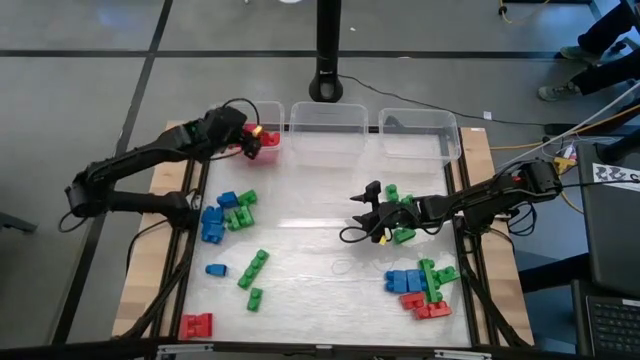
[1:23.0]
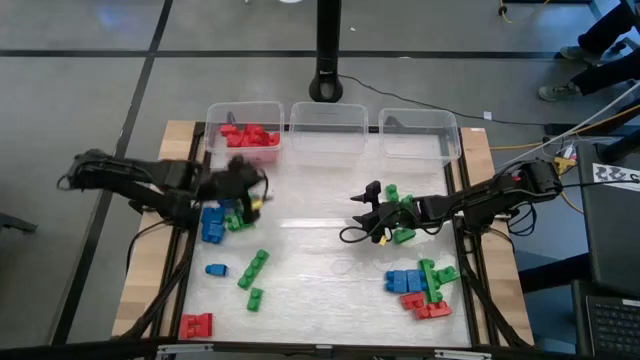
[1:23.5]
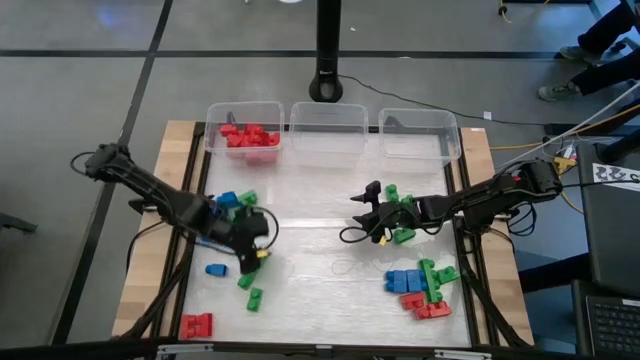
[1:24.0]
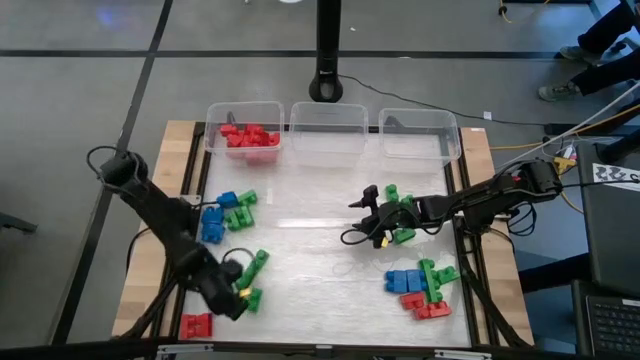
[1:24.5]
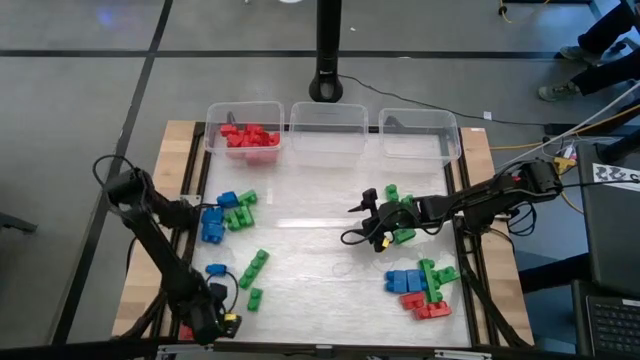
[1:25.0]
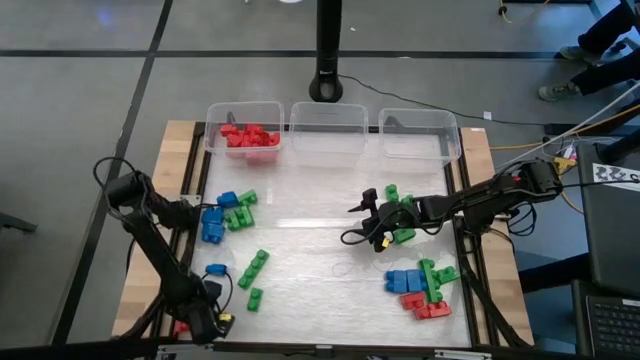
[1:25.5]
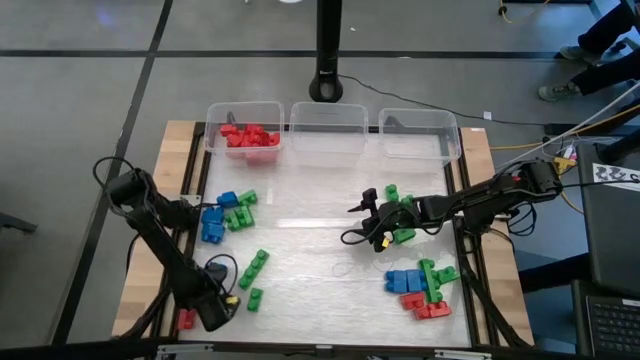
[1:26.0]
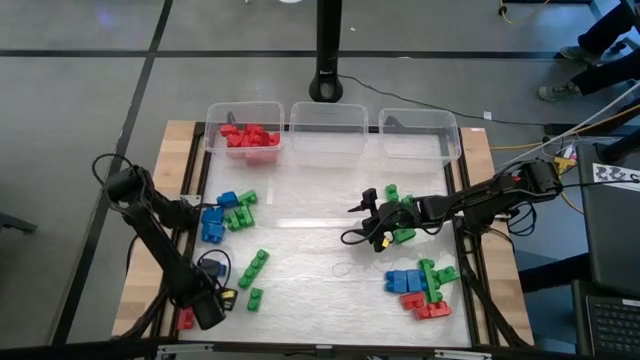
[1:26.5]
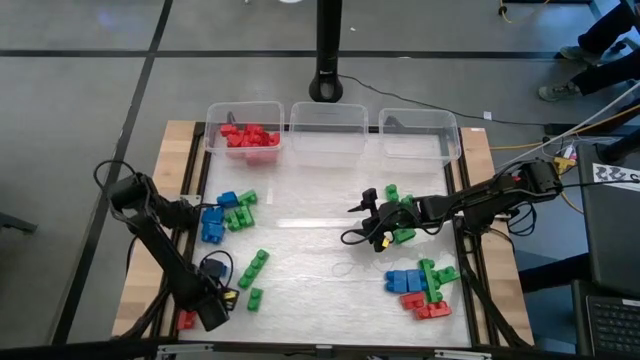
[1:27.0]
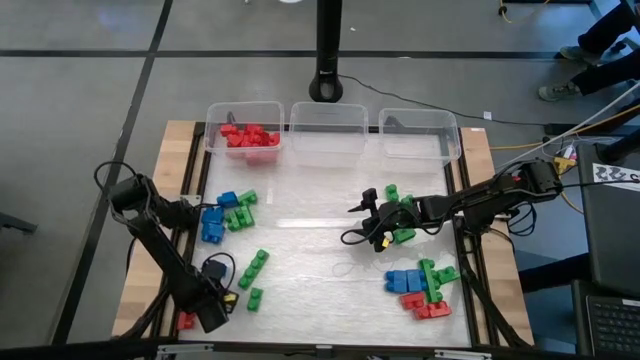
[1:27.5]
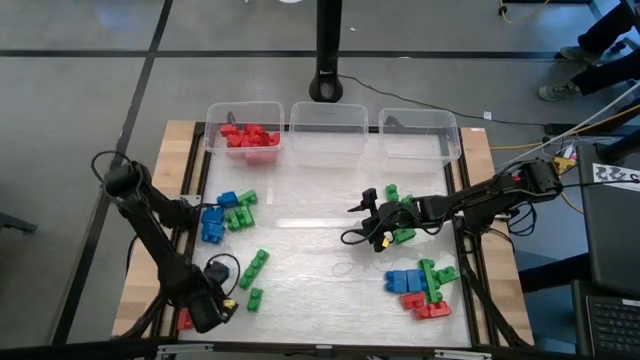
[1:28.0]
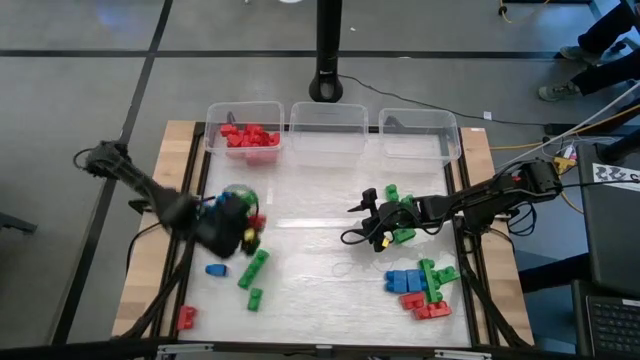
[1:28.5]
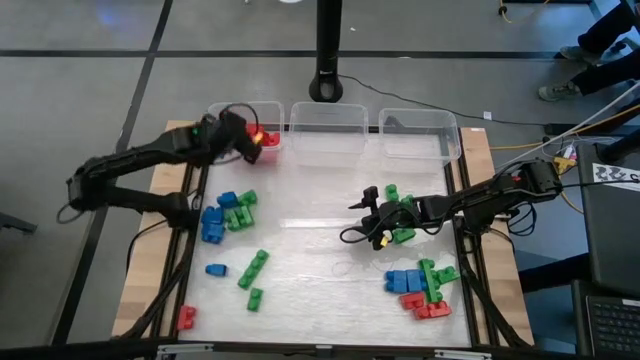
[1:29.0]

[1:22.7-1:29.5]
Task: Sort blocks
Put the red game piece into the left transparent bin

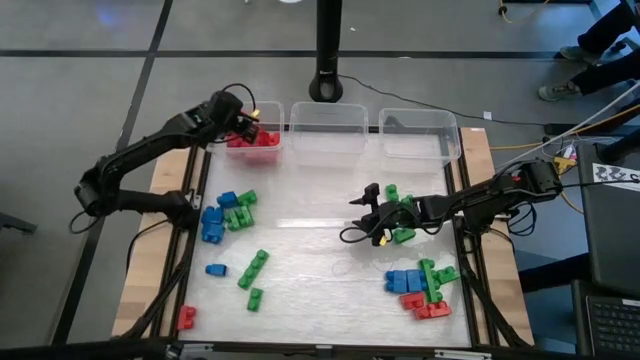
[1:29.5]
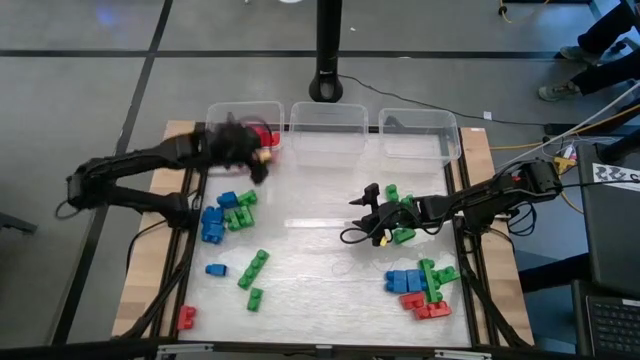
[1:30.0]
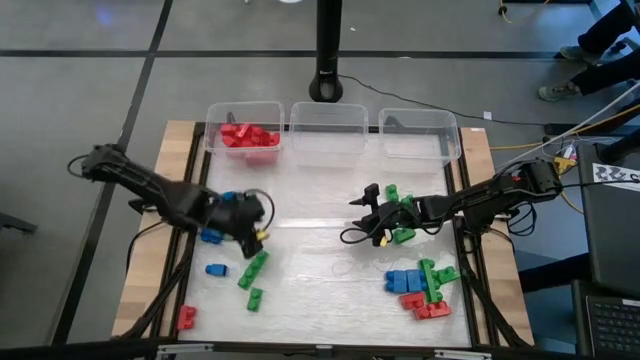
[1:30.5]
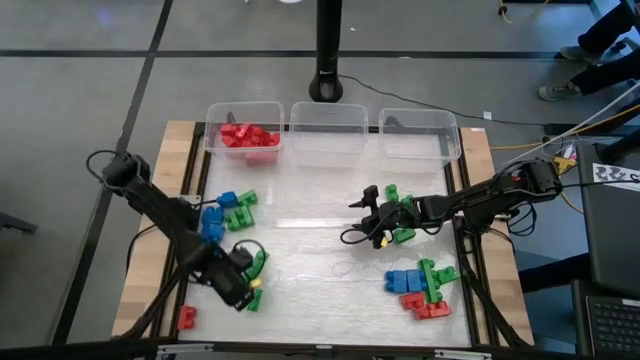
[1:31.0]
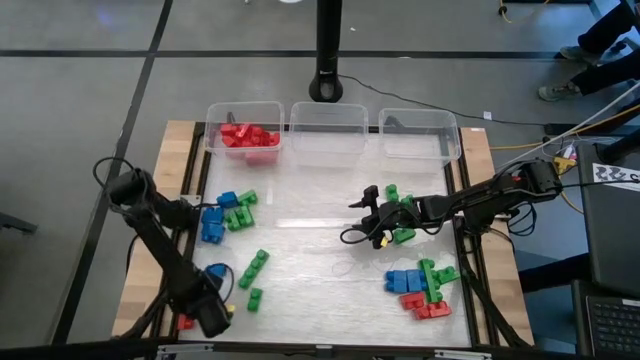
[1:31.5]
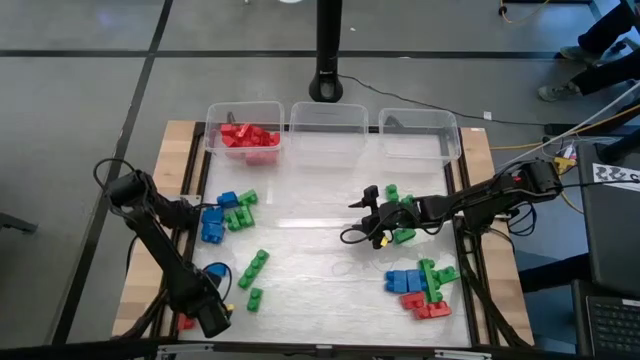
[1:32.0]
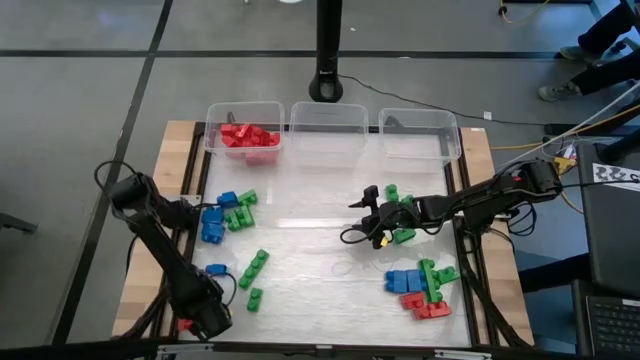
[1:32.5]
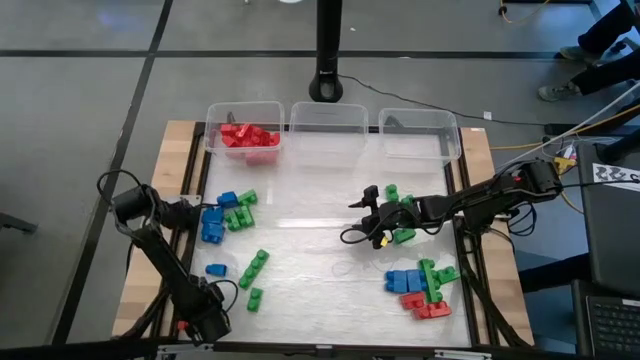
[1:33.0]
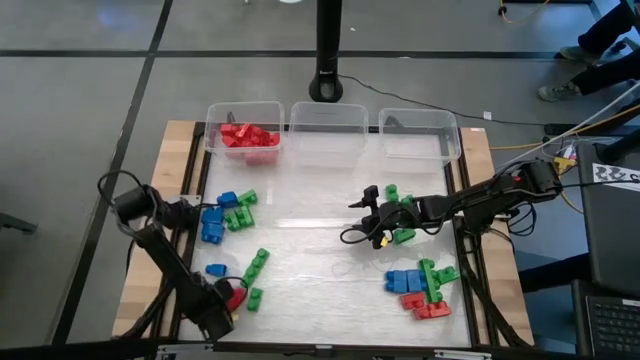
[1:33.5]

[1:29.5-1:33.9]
Put the red game piece into the left transparent bin

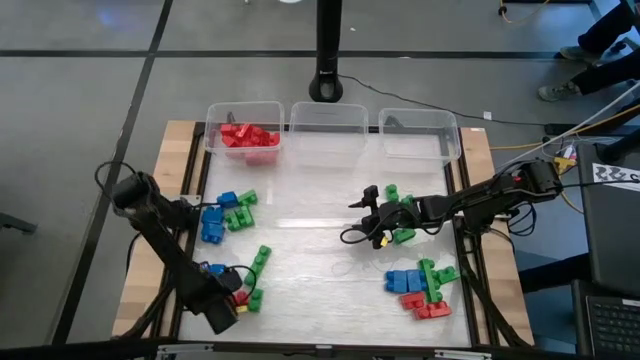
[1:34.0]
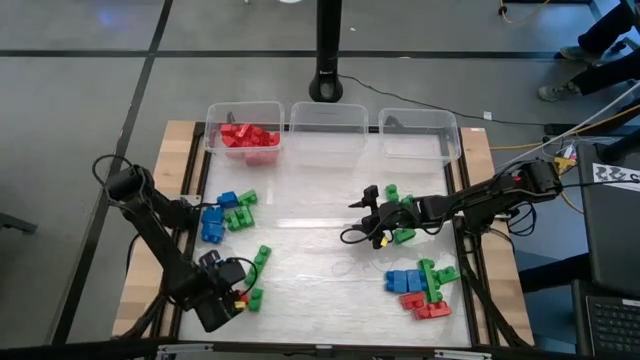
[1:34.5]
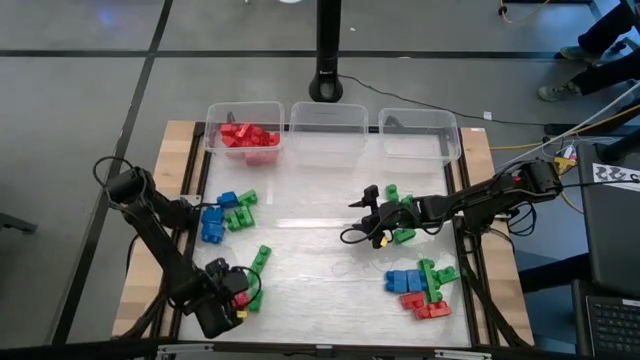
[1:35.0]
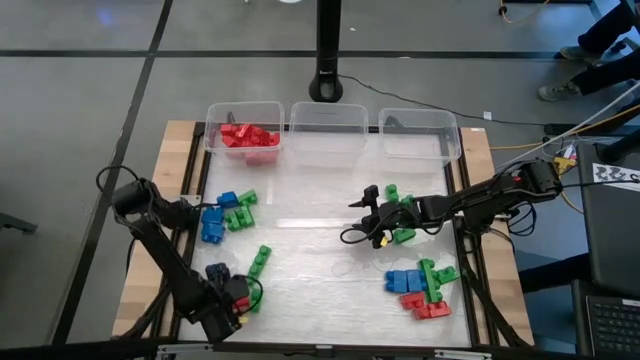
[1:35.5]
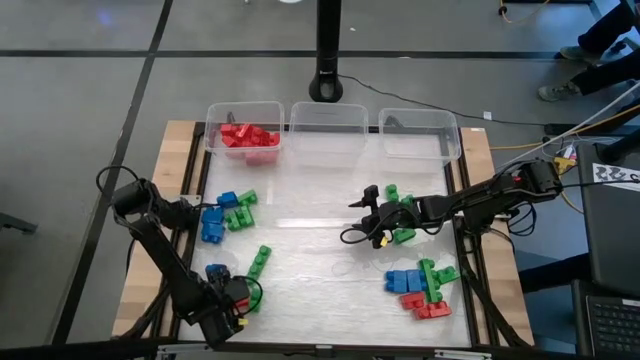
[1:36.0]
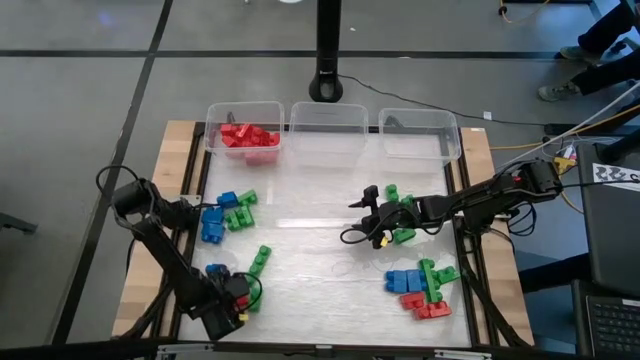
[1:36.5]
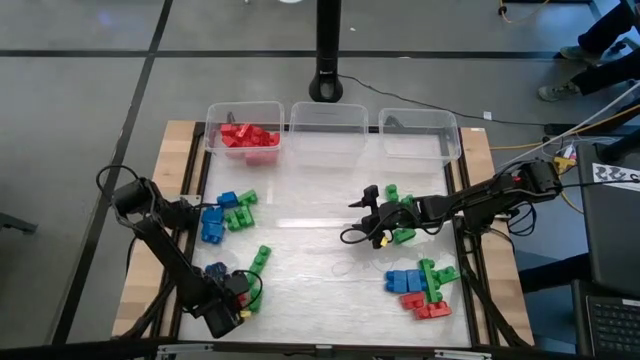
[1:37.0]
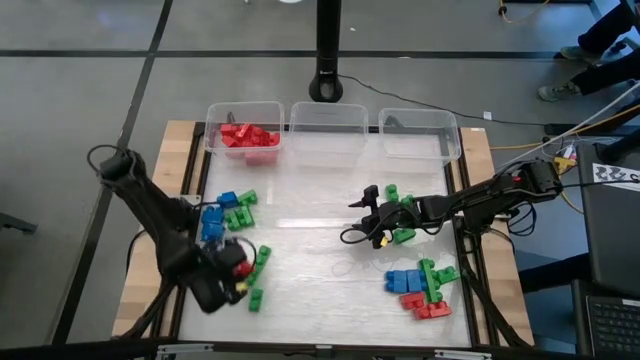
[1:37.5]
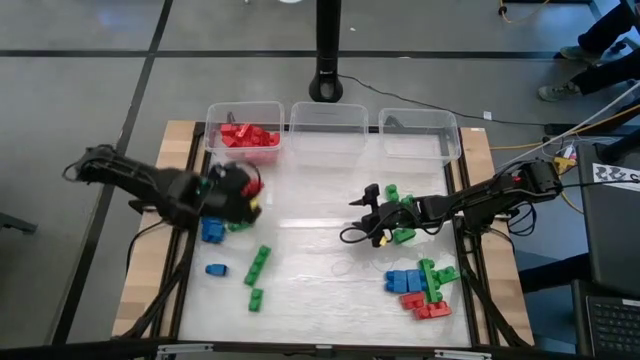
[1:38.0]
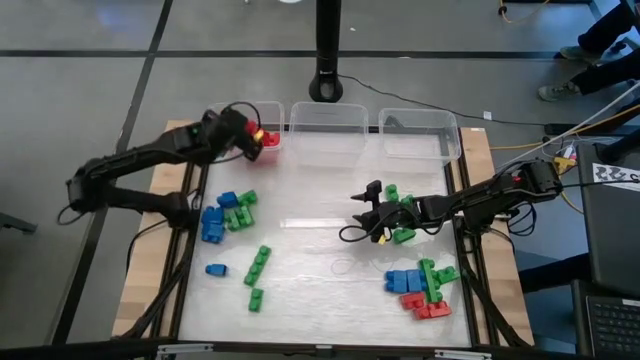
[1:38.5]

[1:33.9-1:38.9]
Put the red game piece into the left transparent bin

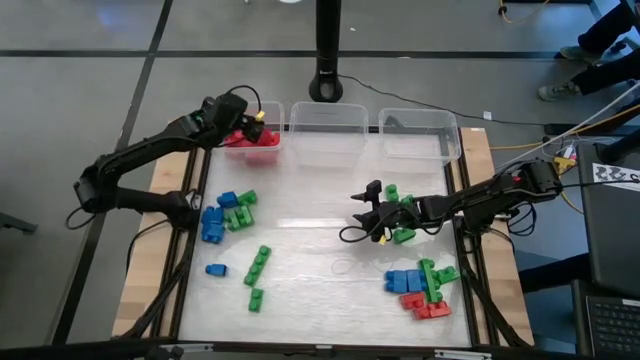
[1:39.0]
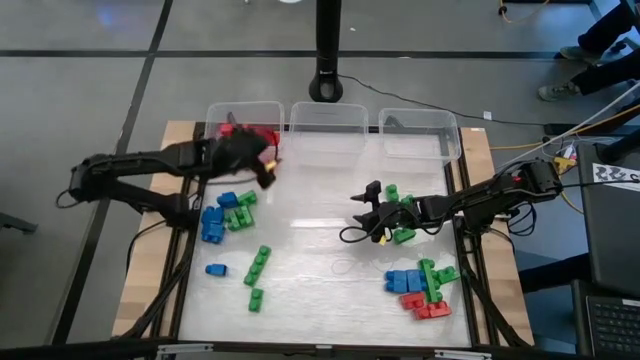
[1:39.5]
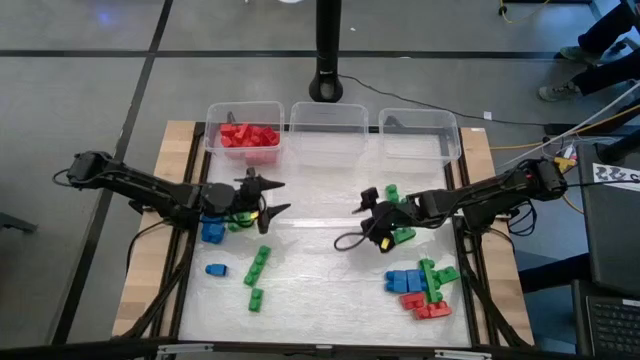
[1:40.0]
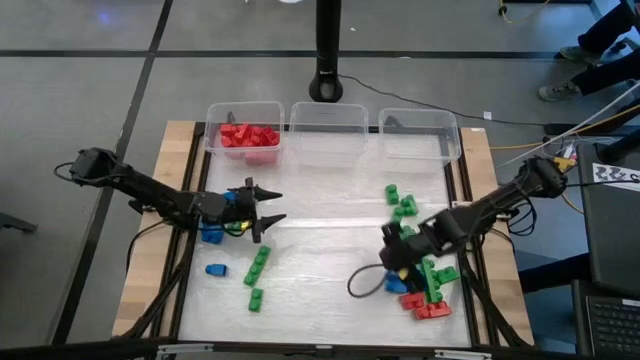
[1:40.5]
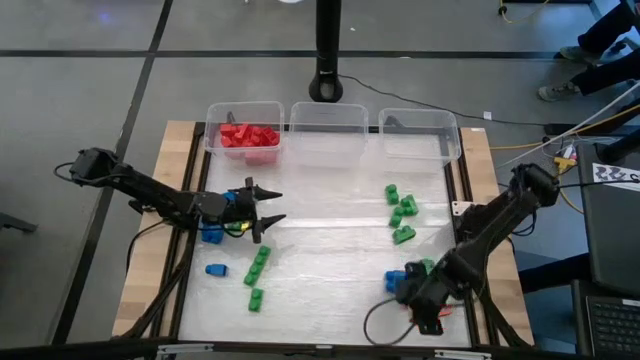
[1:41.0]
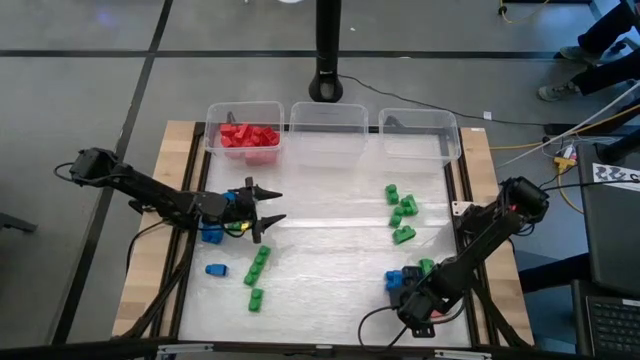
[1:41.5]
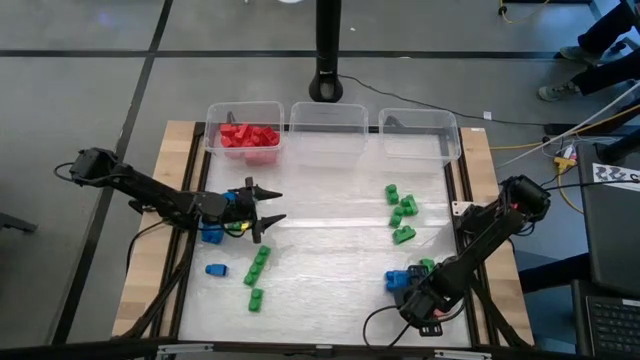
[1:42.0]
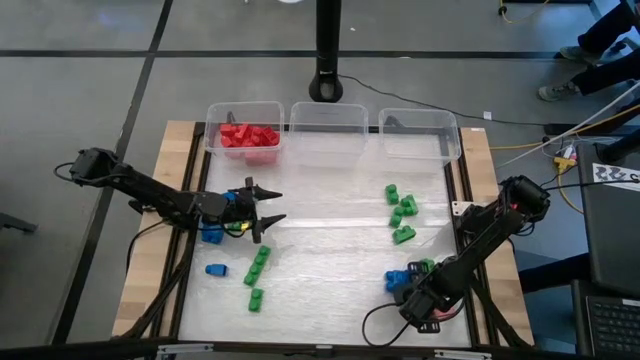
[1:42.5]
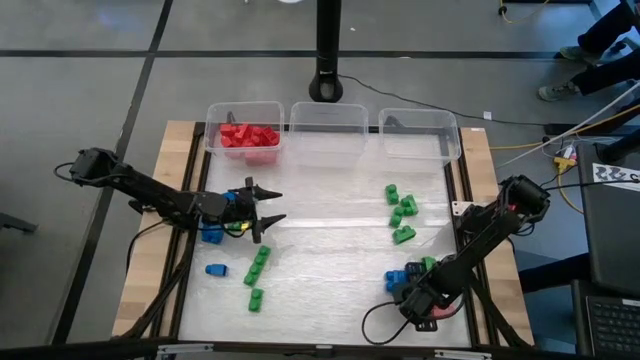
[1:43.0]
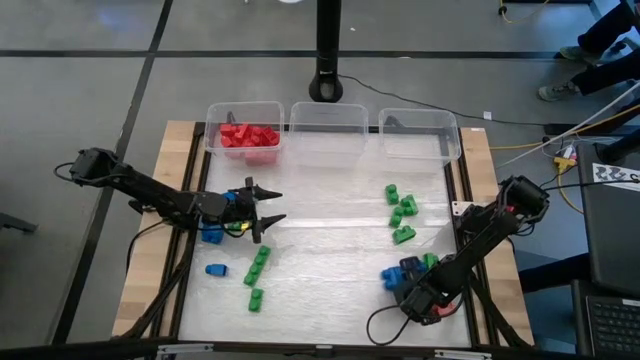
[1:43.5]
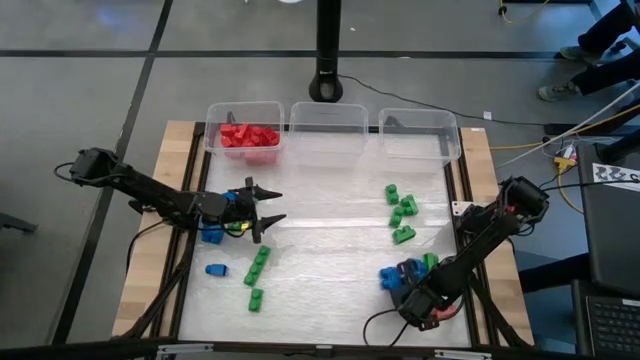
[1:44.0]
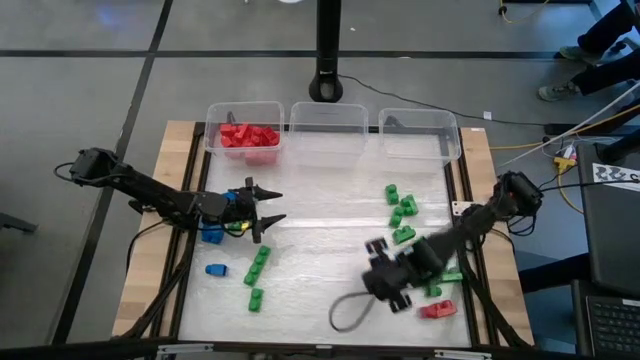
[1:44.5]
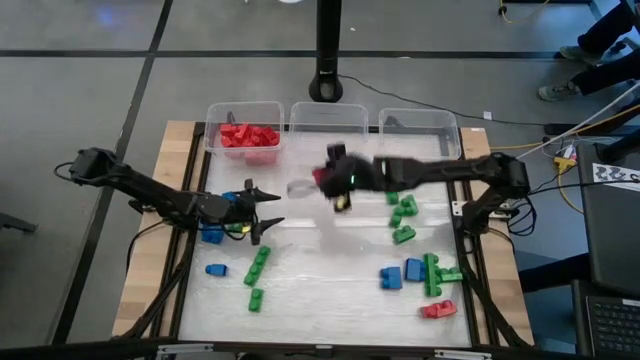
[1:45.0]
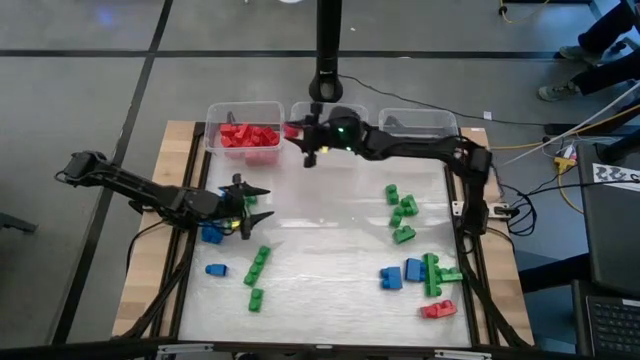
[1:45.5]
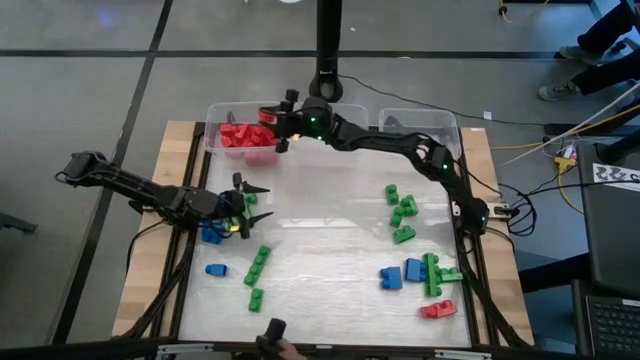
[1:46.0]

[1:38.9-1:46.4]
Put the red game piece into the left transparent bin
